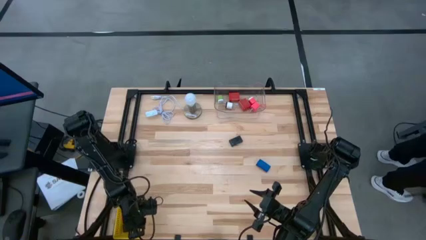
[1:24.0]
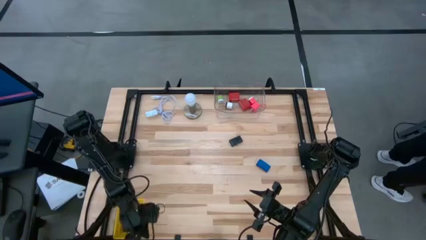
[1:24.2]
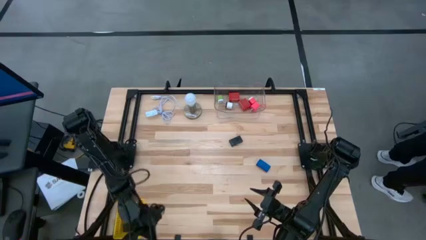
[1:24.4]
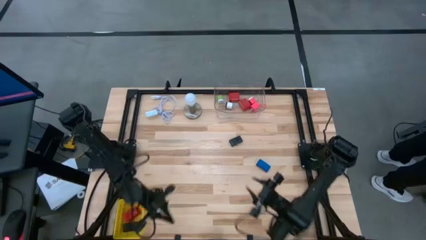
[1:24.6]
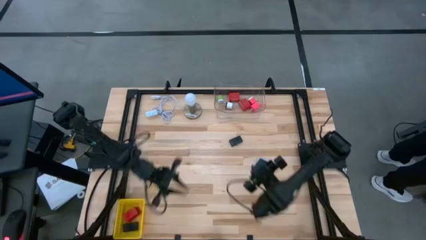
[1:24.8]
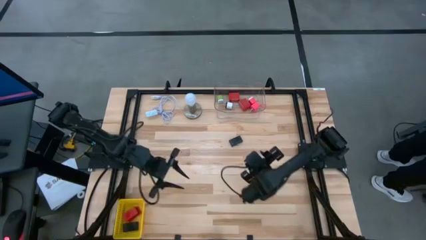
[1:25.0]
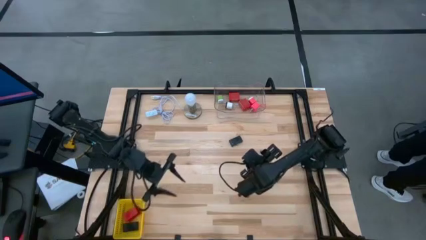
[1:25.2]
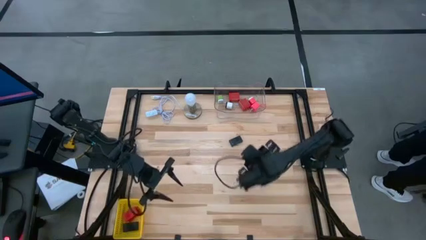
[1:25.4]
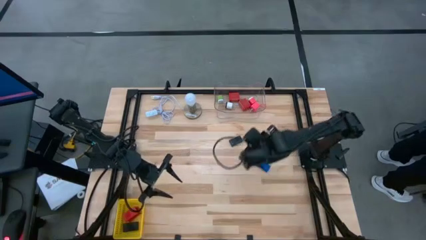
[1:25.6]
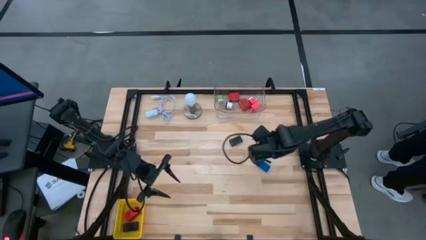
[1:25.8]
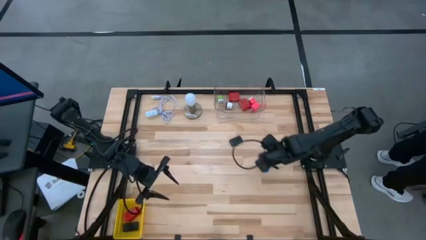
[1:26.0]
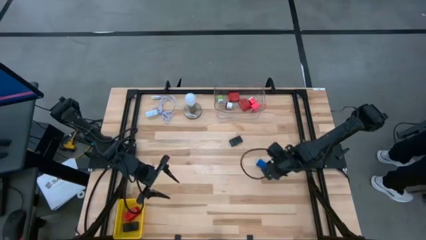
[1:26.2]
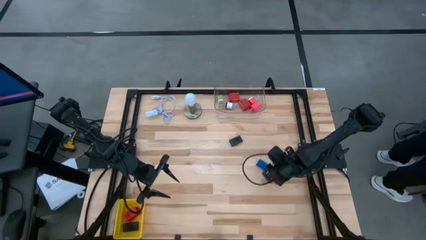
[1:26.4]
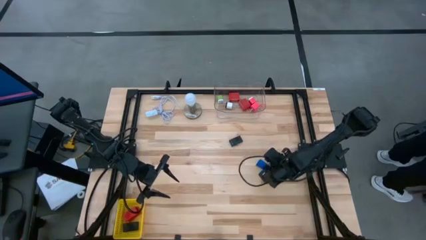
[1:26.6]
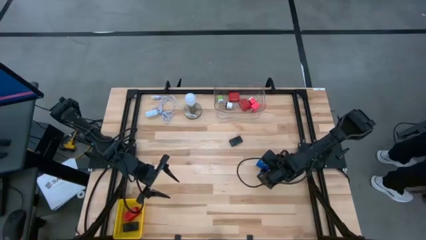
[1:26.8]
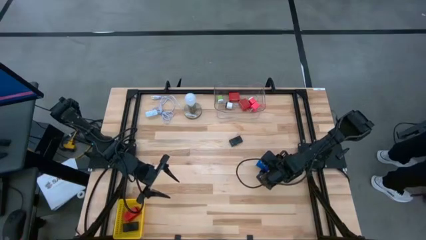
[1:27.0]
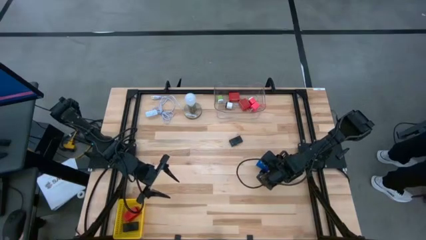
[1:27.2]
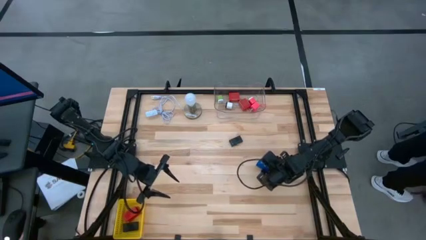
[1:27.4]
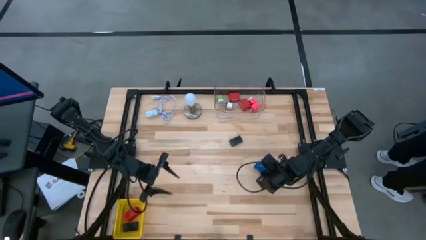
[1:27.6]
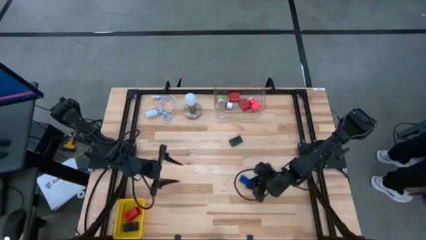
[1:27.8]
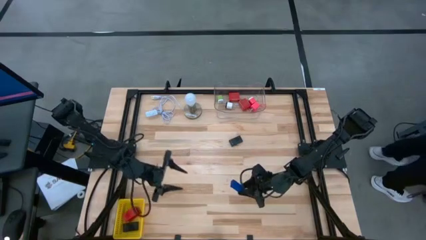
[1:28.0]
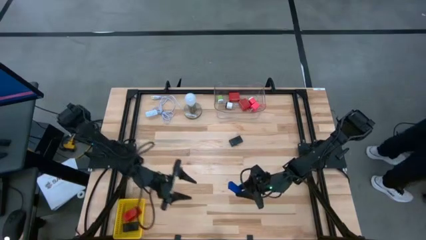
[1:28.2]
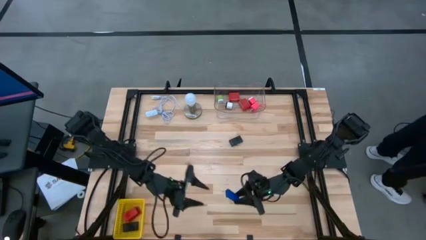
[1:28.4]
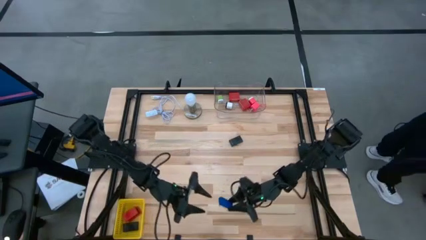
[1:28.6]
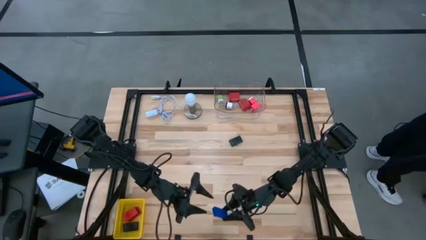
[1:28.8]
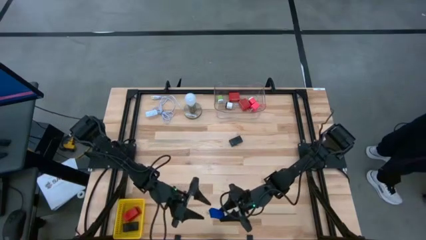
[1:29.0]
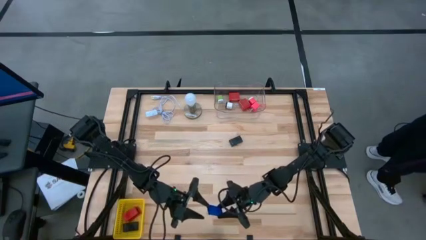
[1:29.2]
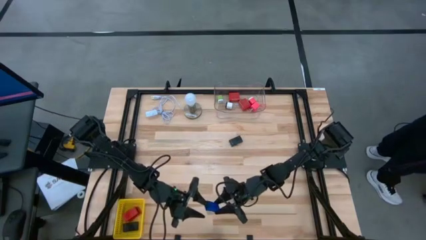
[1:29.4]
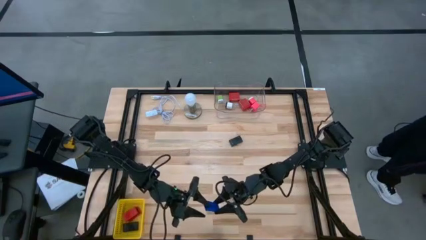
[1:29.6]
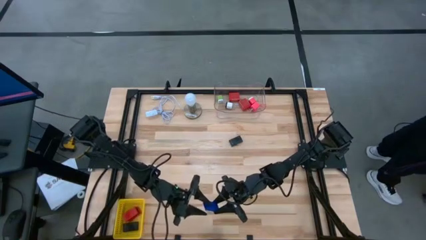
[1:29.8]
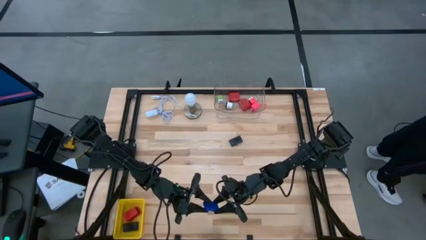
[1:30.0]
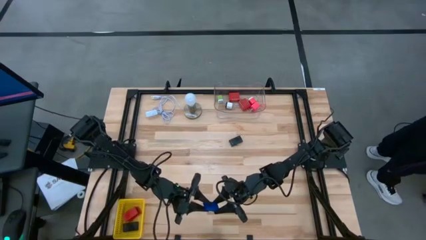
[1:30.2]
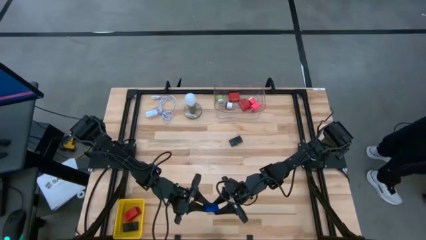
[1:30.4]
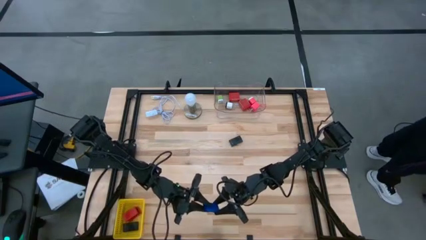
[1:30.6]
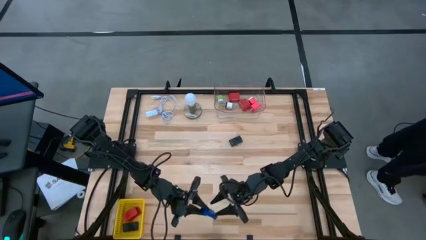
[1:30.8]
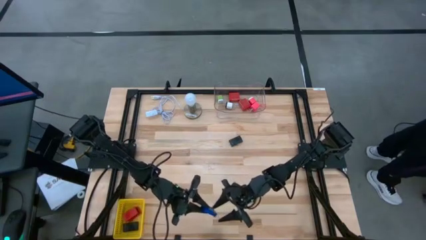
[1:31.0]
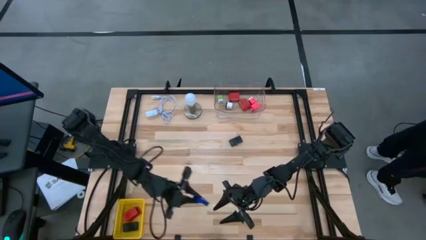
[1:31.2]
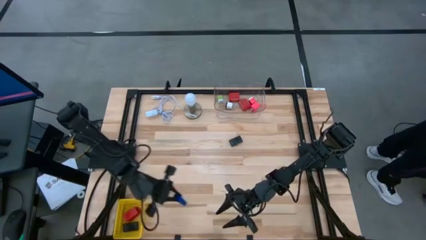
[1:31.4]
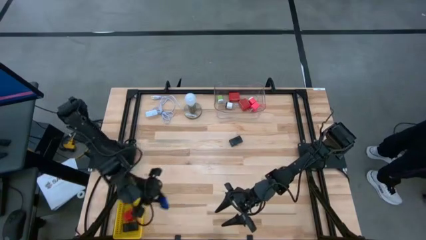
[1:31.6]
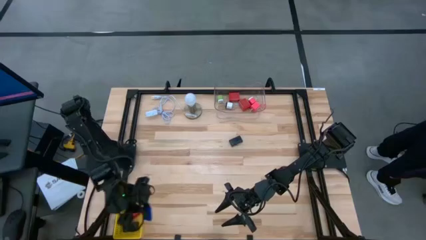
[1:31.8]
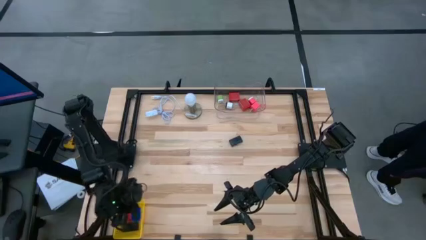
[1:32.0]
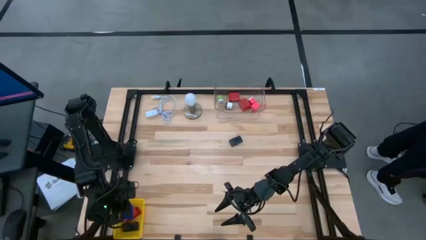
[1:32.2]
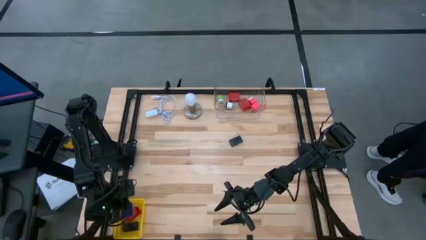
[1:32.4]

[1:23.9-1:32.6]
Task: Pick & Place Office items
Put the blue digital clock into the yellow basket
